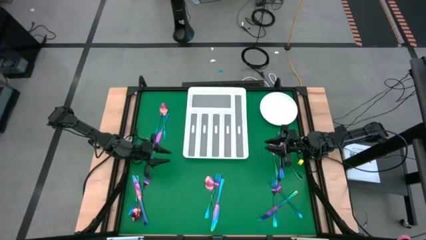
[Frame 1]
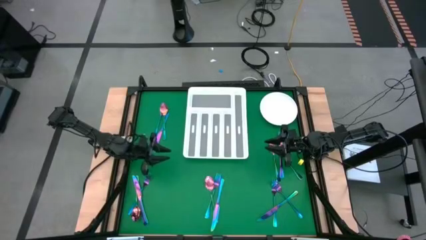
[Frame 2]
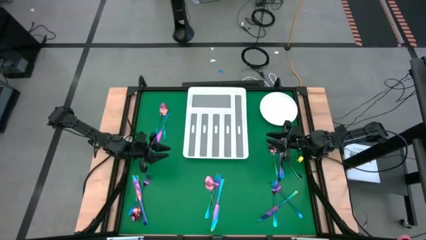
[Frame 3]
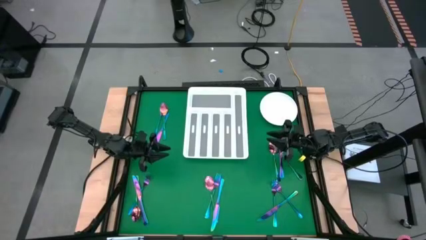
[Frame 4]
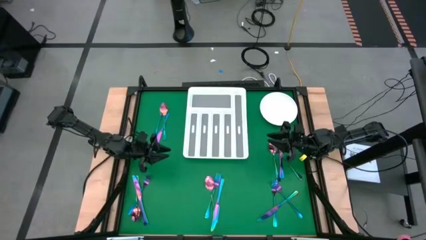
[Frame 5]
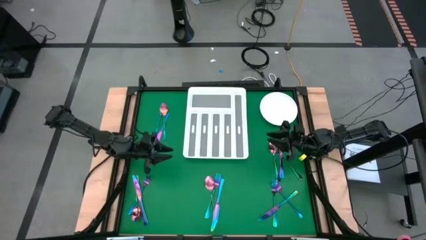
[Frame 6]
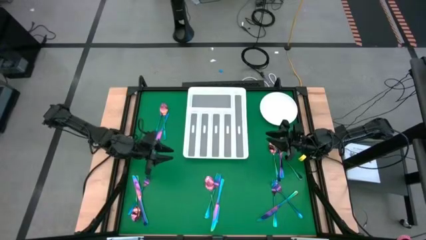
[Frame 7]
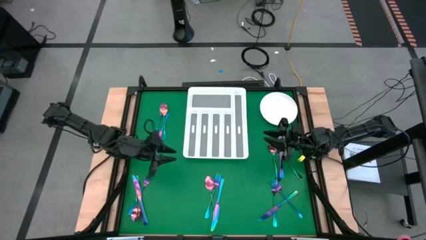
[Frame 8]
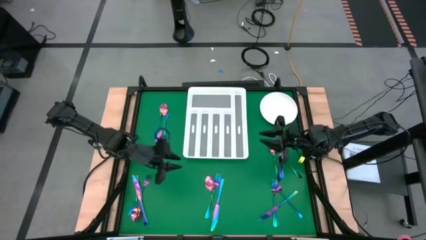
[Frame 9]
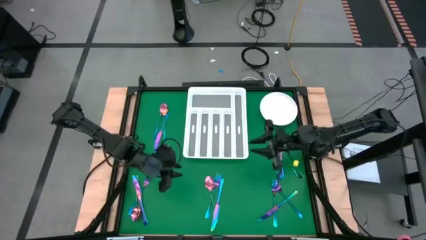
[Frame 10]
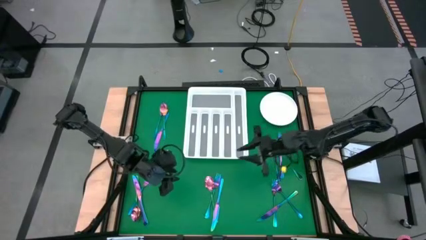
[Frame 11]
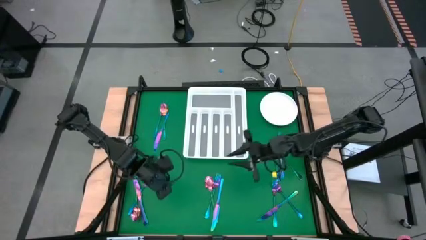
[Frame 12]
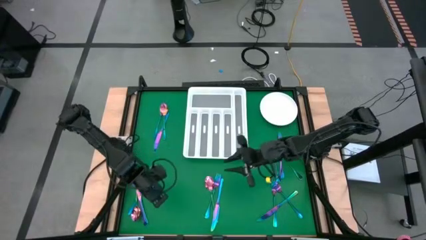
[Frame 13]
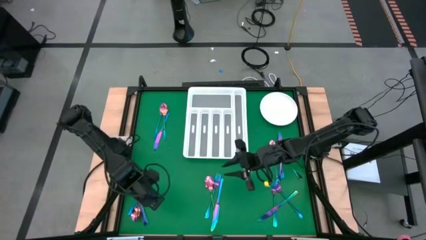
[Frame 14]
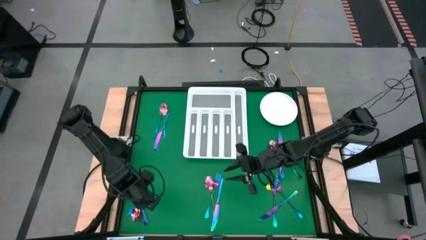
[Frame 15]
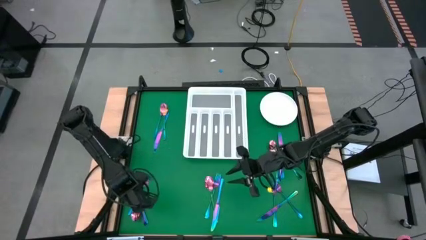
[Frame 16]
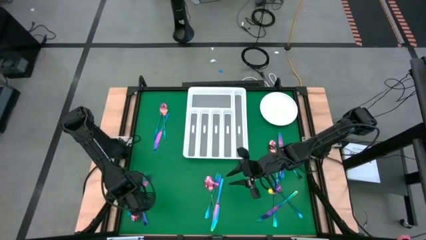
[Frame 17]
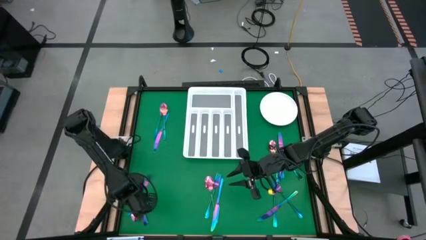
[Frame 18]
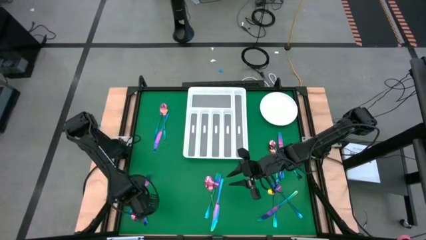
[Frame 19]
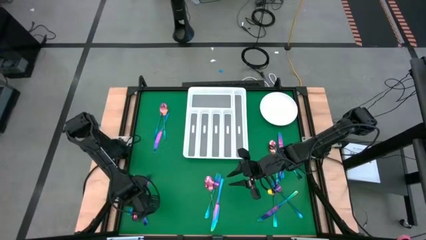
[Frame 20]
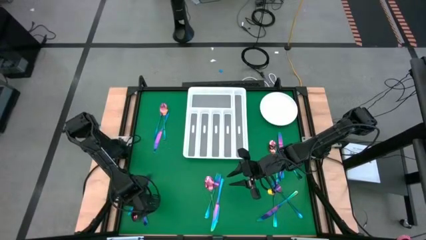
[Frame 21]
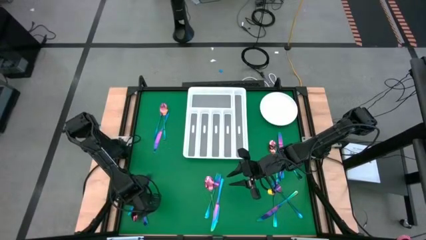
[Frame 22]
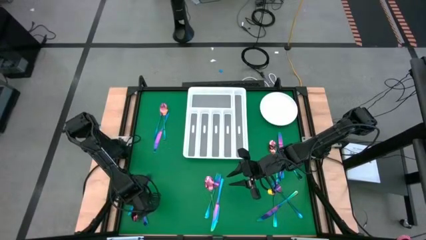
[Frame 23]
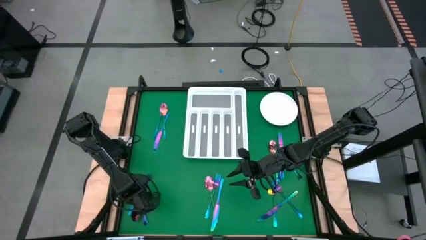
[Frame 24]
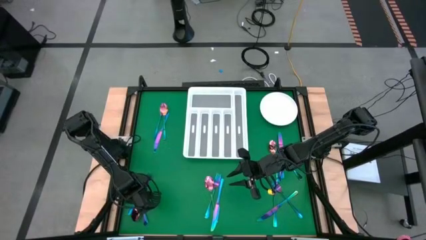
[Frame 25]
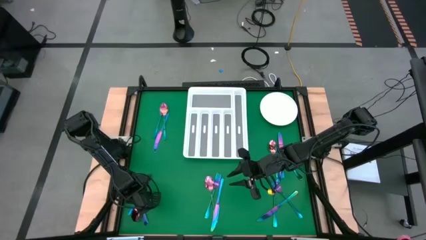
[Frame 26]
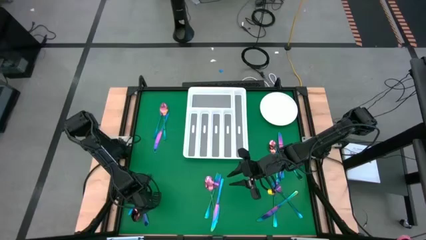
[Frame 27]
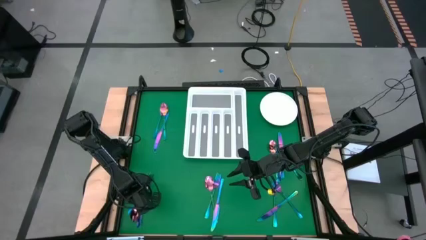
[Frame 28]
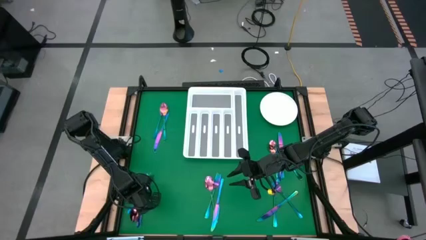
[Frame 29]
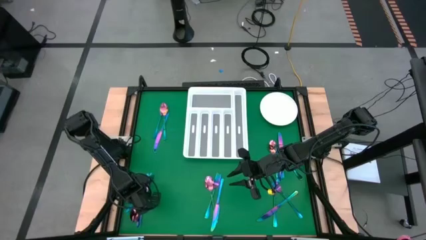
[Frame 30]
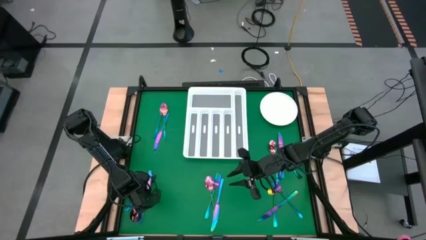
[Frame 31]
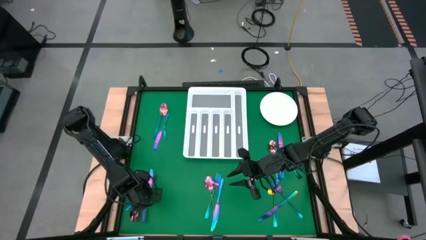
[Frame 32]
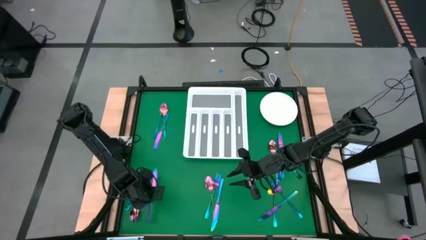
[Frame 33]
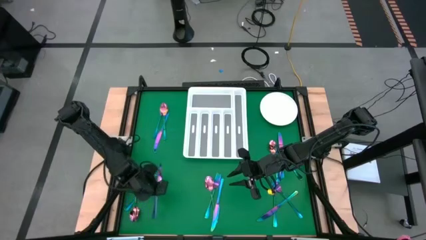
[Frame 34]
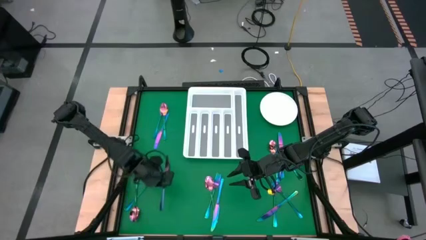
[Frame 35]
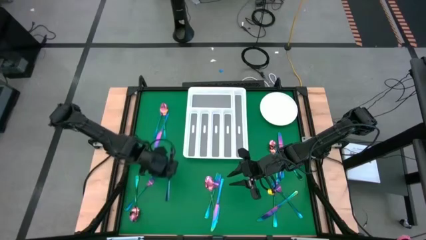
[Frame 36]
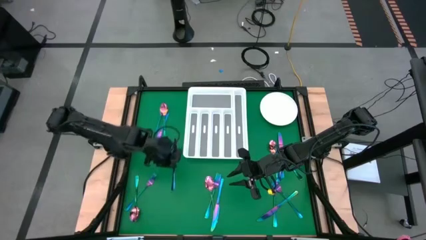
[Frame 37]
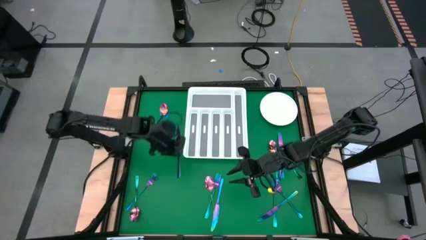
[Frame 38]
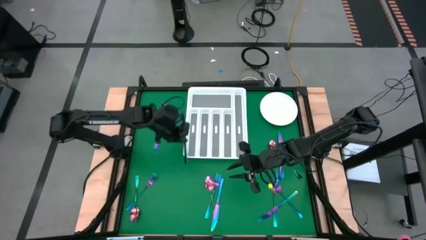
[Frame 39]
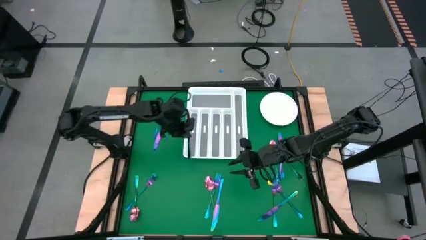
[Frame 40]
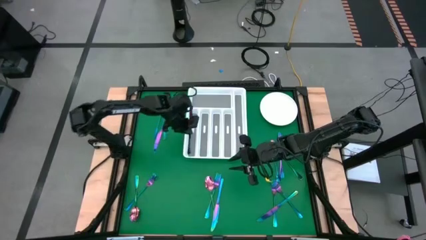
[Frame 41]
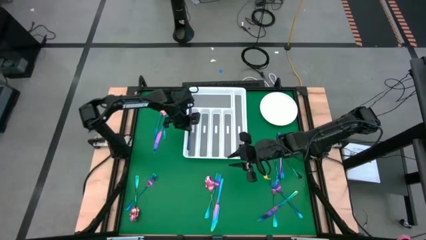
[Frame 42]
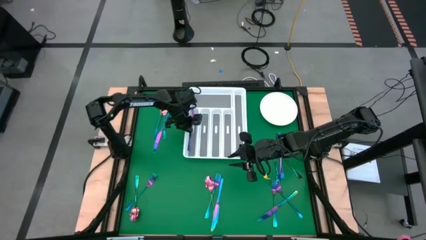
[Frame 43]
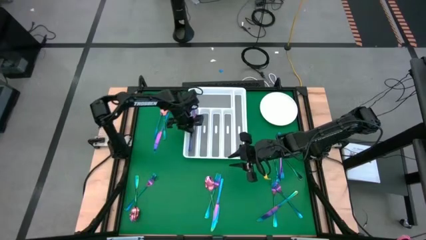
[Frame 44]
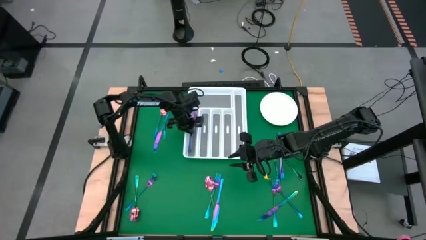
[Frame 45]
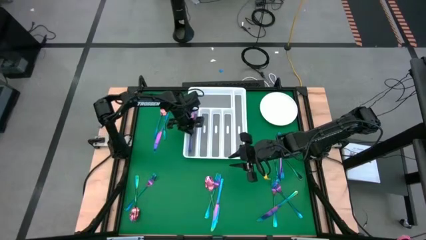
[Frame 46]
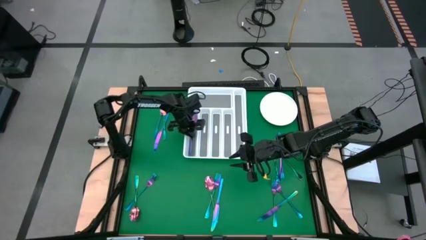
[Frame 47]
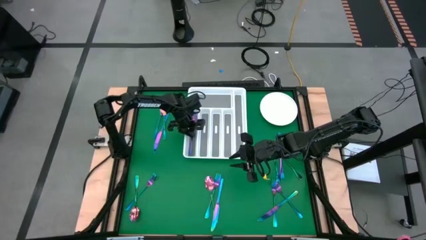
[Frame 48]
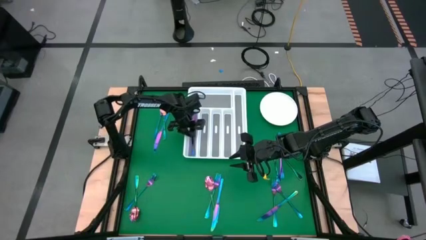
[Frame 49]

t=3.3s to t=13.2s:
Task: Sort silverware
Put the blue table knife into the silverware tray
